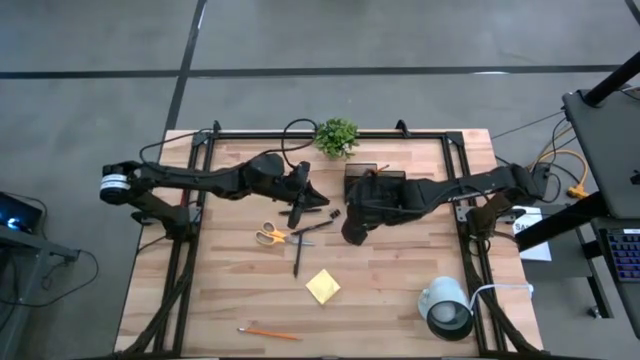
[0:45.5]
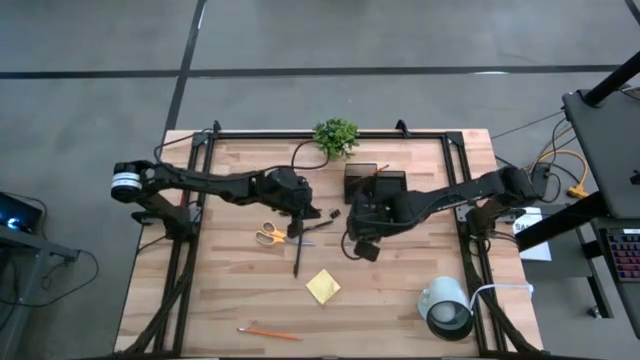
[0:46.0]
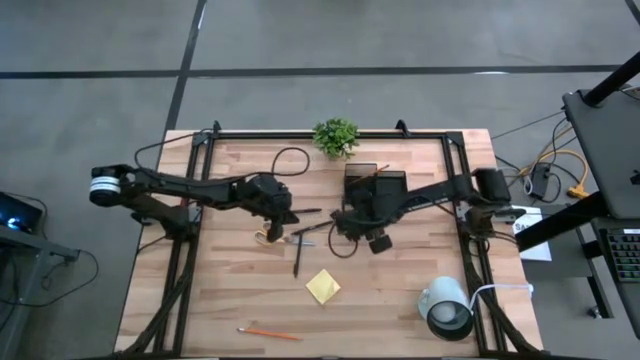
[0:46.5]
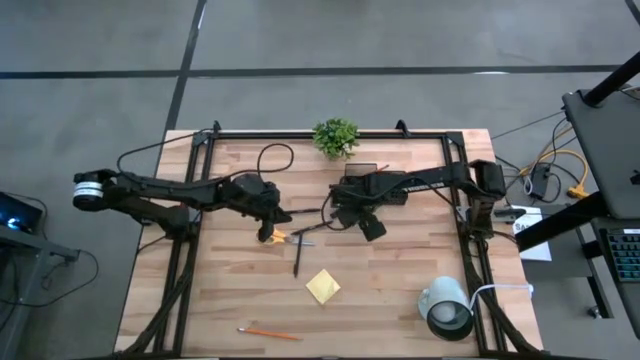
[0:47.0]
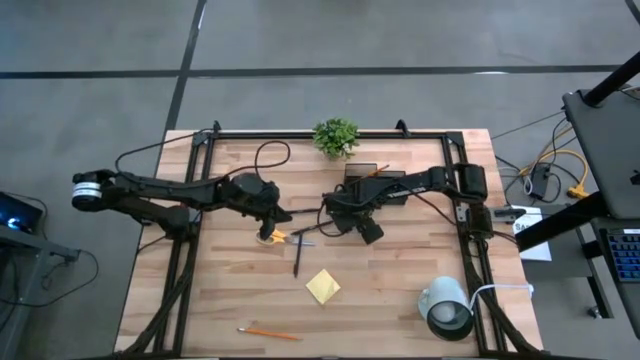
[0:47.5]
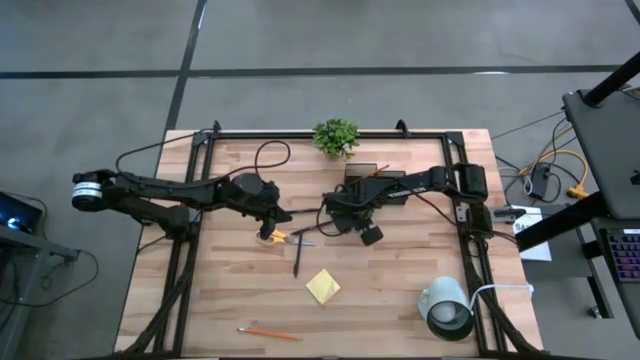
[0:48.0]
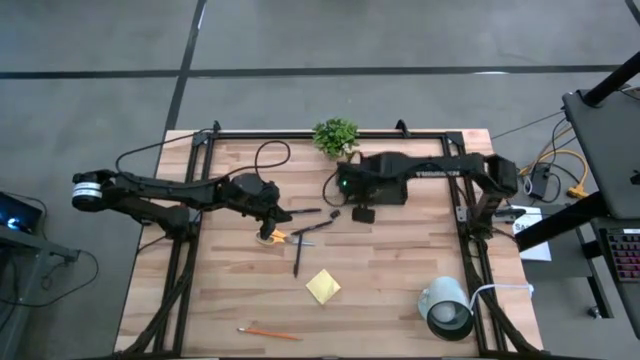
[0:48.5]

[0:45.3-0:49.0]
Task: Pick and place office supplies into organizer
Put the bottom black binder clip into the desk organizer

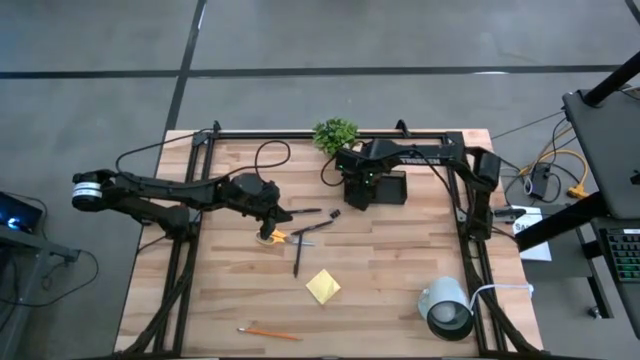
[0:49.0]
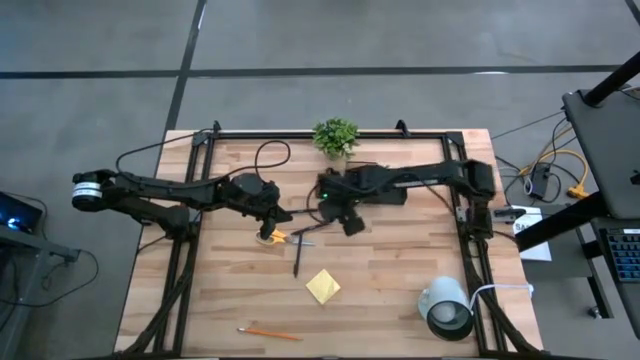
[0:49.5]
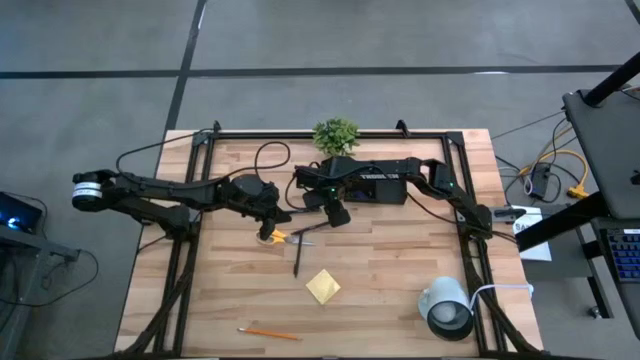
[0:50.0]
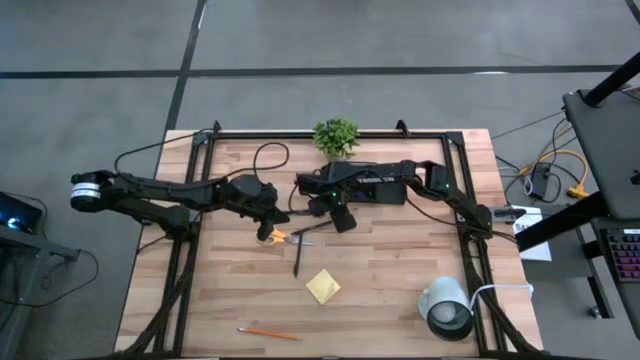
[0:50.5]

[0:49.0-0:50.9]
Put the black binder clip into the desk organizer

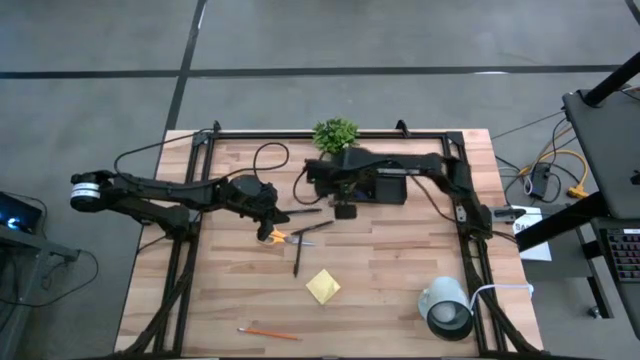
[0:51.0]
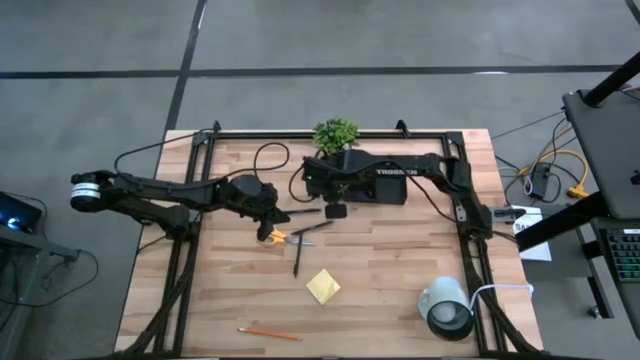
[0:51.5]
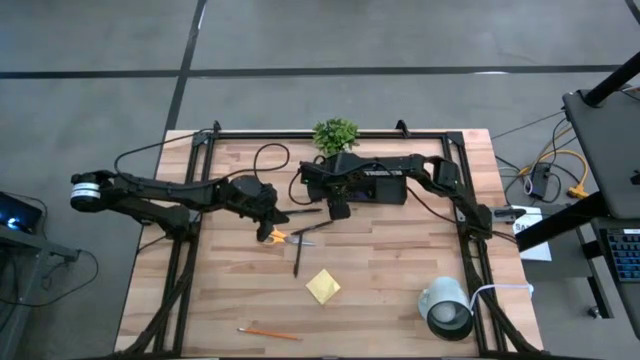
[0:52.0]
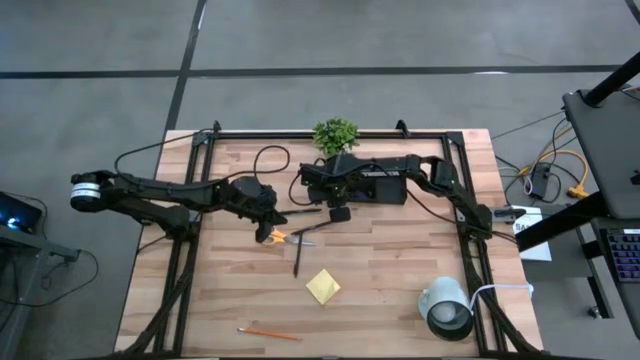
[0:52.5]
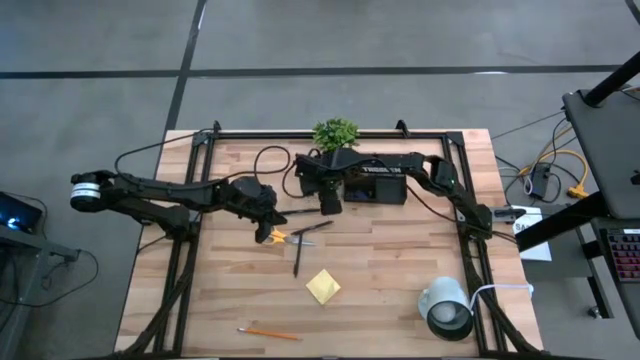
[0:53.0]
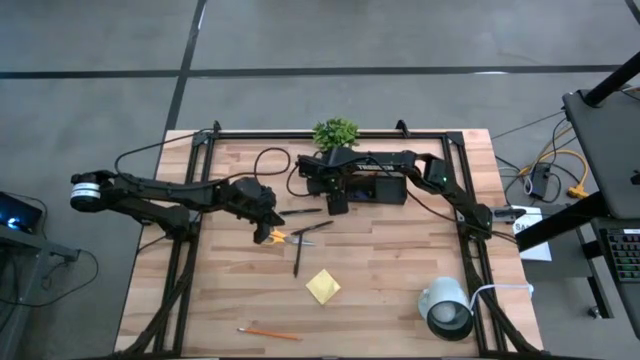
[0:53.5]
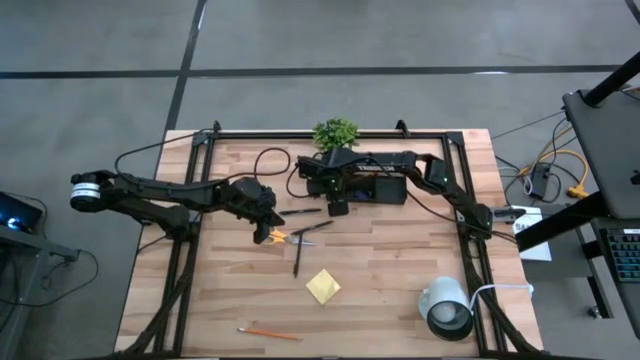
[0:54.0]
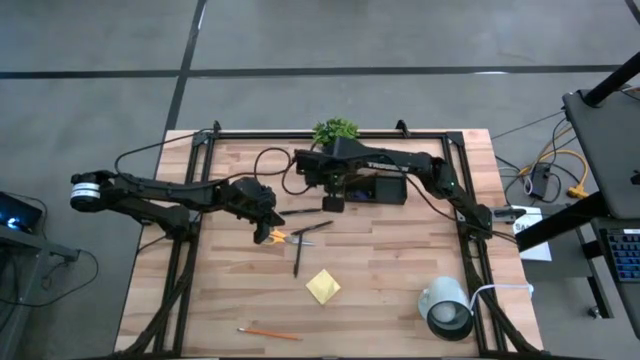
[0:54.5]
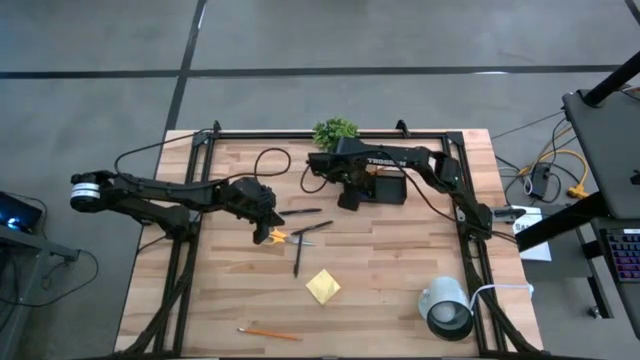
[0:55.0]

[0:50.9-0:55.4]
Put the black binder clip into the desk organizer

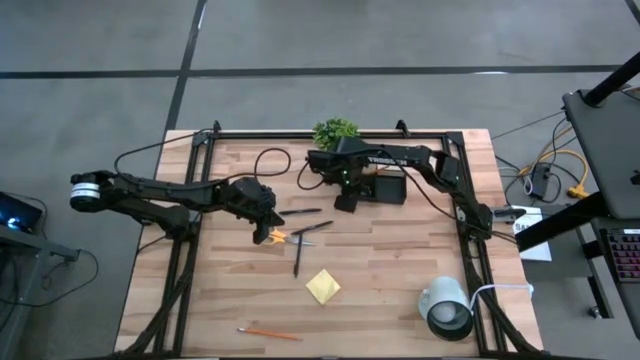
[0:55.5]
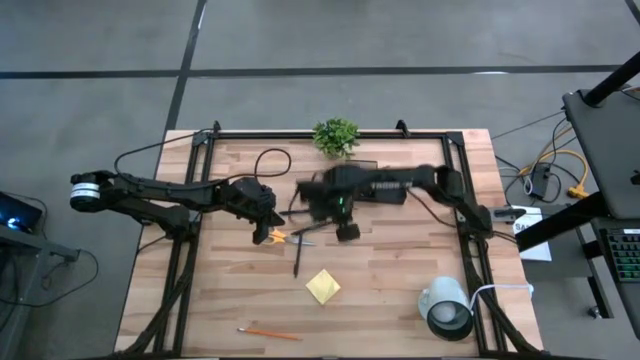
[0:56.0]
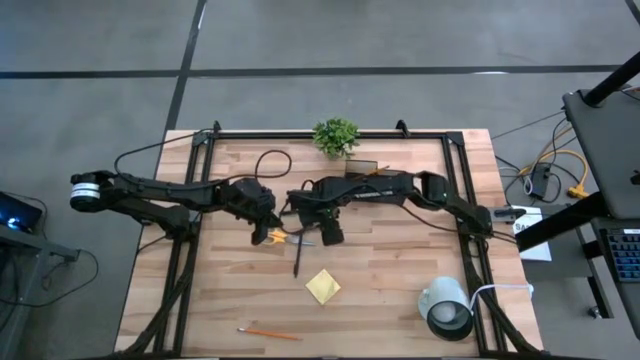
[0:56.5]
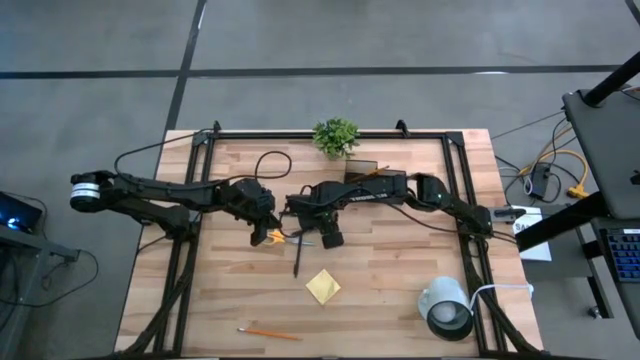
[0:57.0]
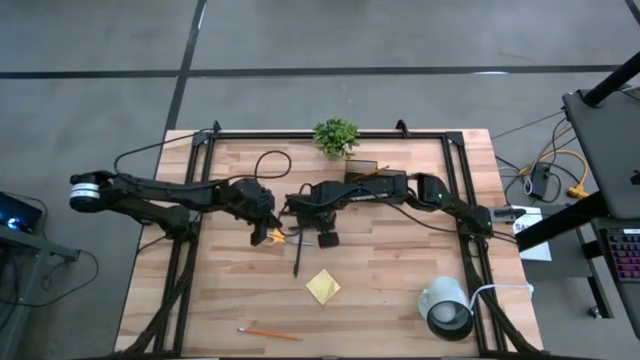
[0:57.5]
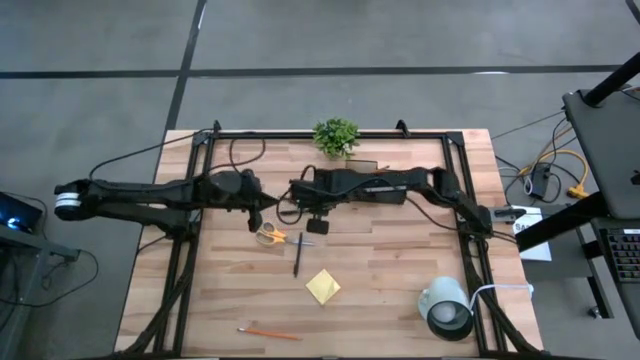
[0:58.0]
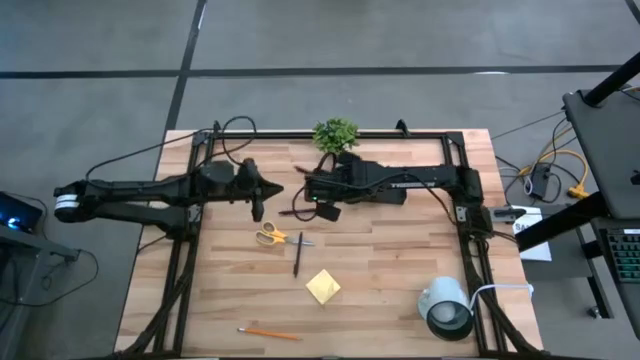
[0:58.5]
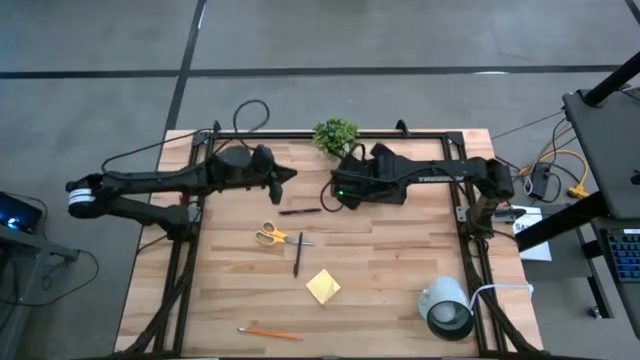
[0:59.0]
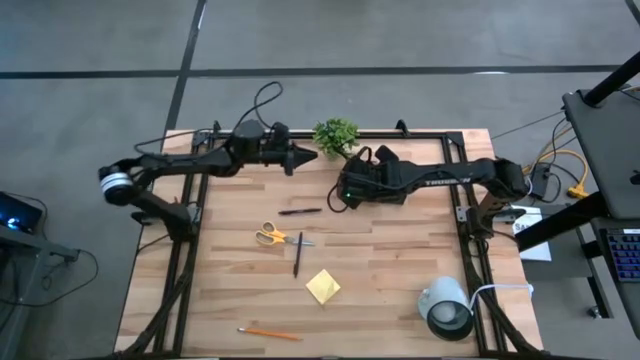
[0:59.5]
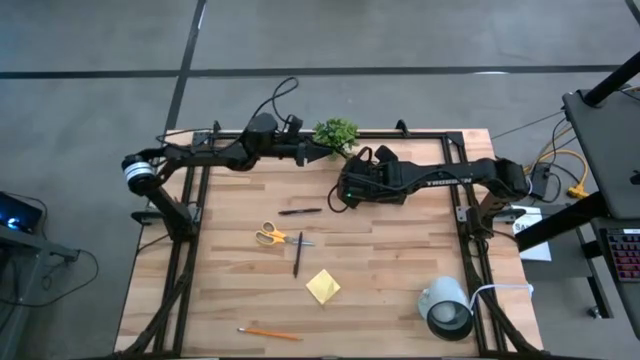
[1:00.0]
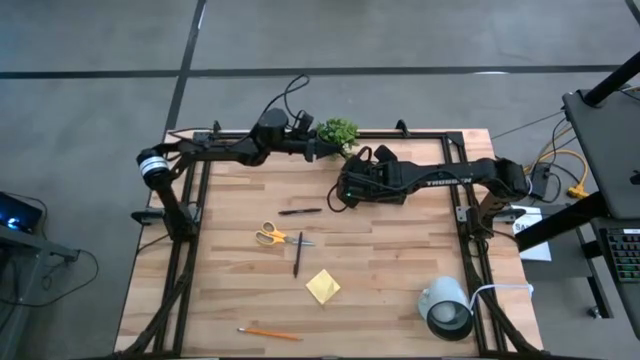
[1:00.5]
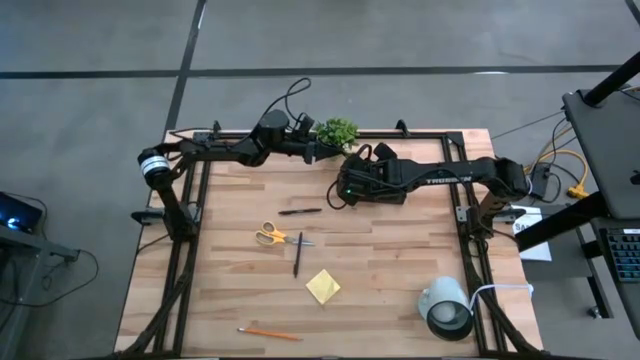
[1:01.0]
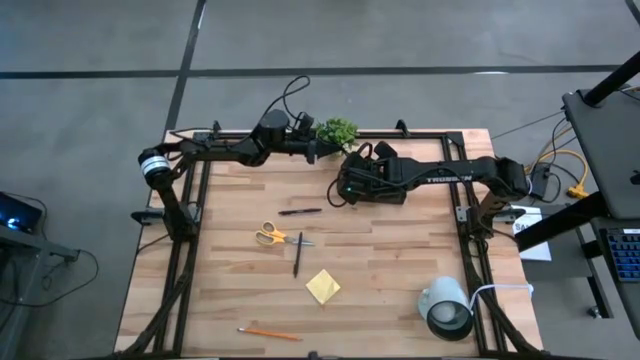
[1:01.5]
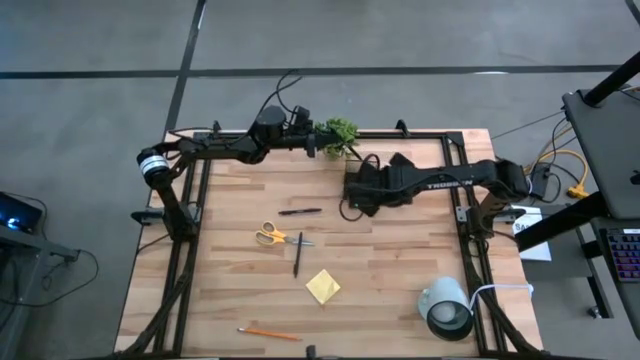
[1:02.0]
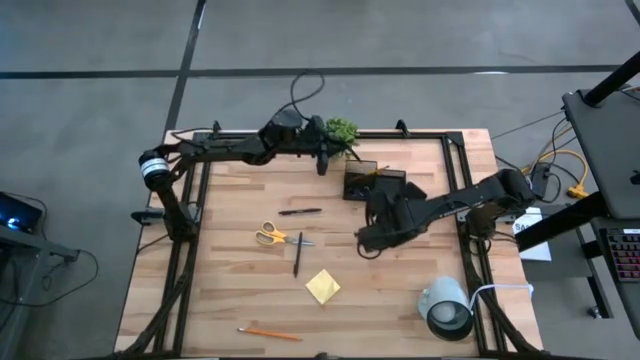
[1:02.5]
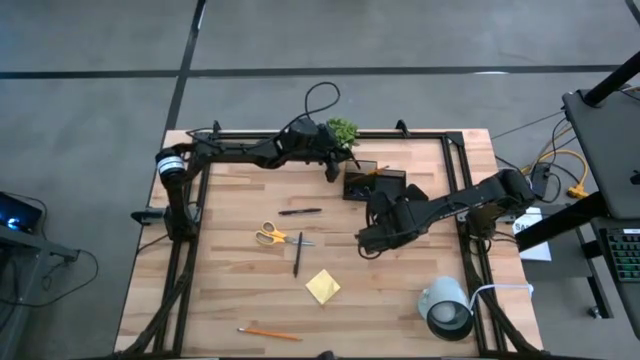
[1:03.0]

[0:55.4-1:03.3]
Put the middle black pen into the desk organizer

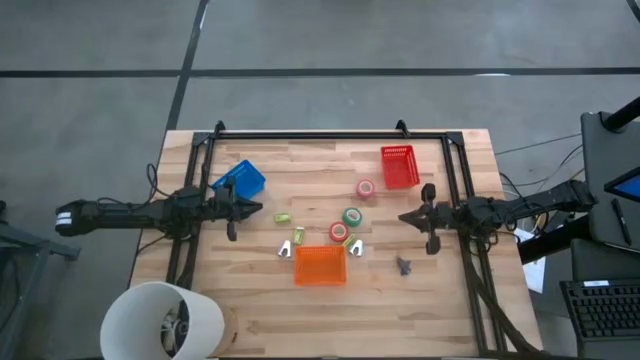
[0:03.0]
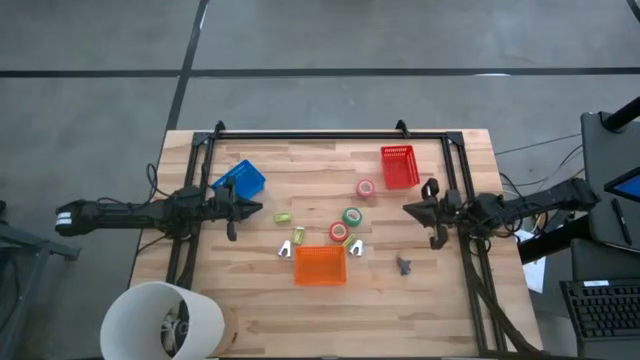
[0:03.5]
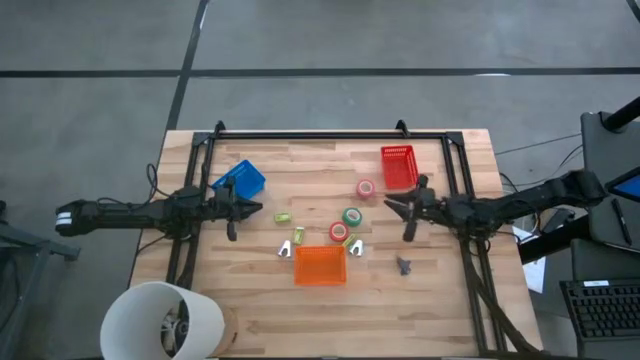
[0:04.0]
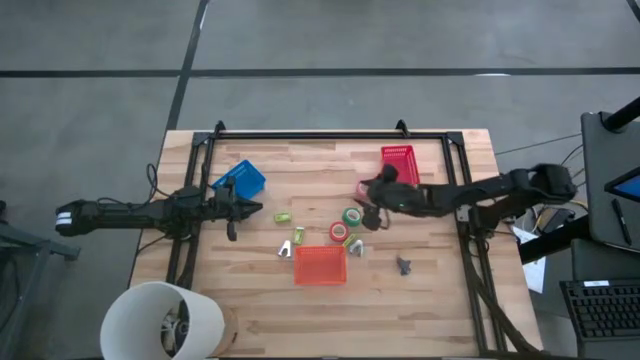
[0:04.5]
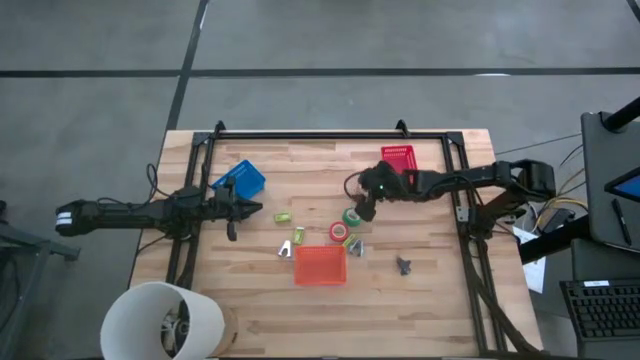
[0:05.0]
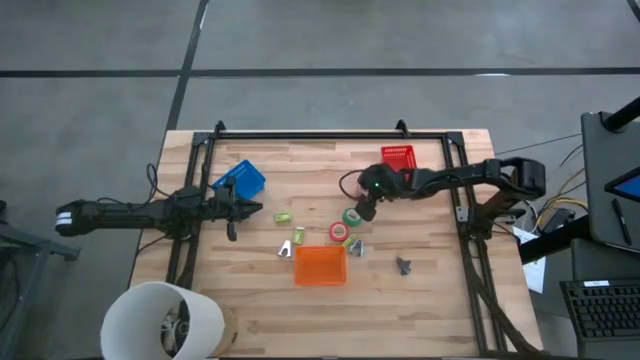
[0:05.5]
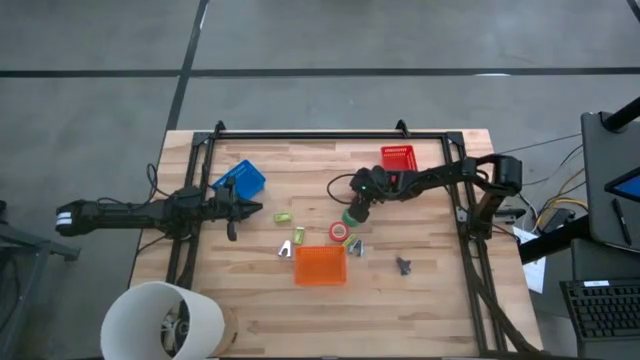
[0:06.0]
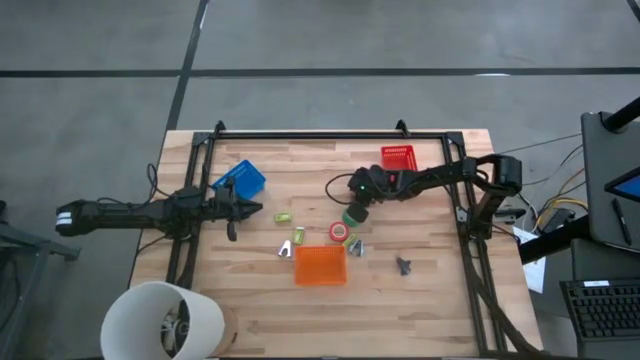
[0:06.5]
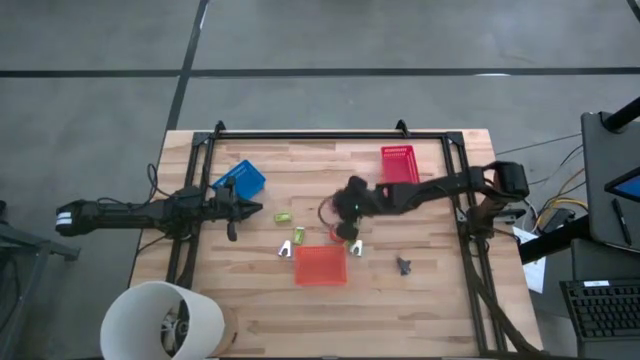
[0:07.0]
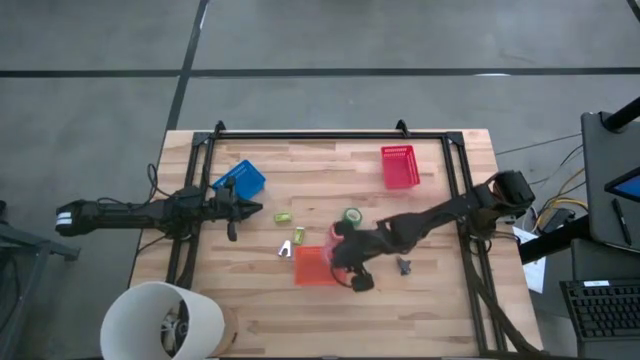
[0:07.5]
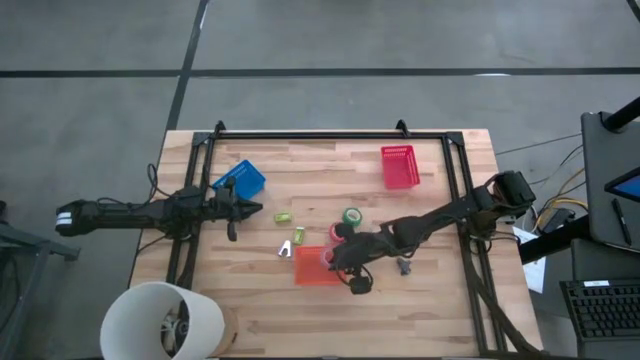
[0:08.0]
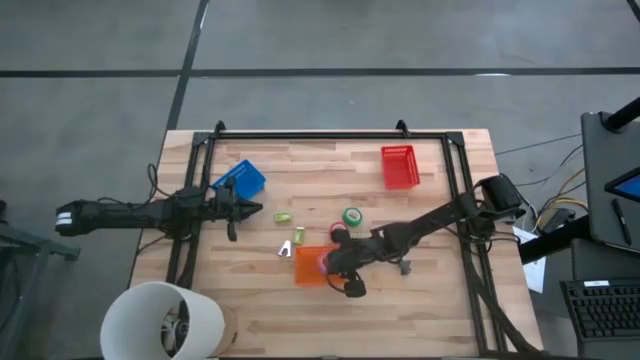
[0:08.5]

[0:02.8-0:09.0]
Task: Pick and place Stapler, Stapler remover, tape
Put the pink tape into the orange bin
